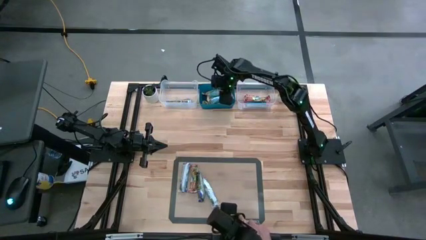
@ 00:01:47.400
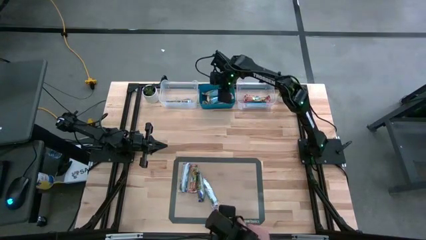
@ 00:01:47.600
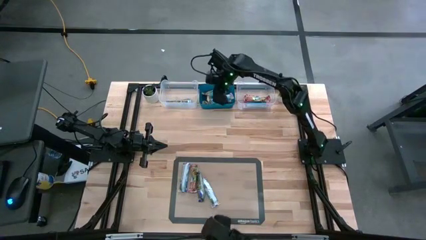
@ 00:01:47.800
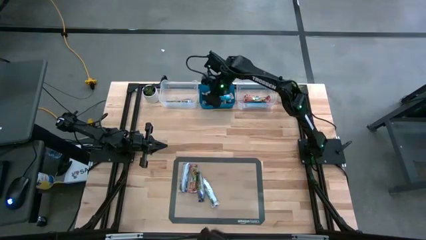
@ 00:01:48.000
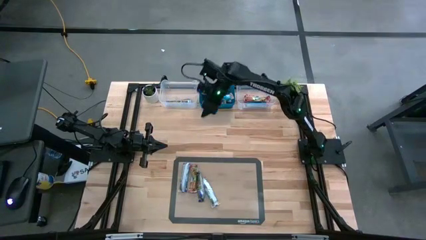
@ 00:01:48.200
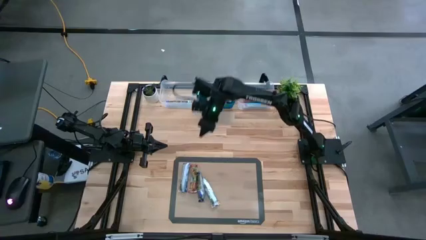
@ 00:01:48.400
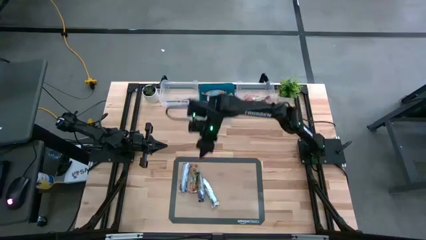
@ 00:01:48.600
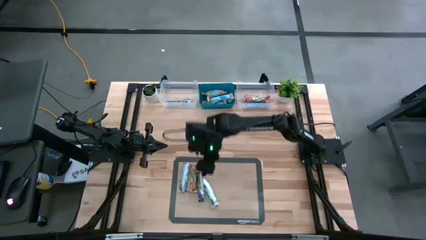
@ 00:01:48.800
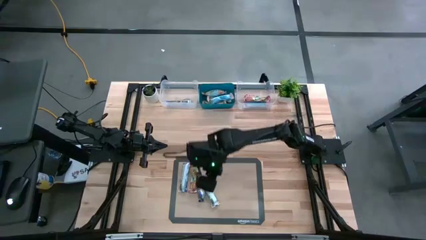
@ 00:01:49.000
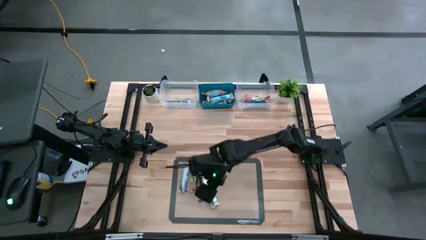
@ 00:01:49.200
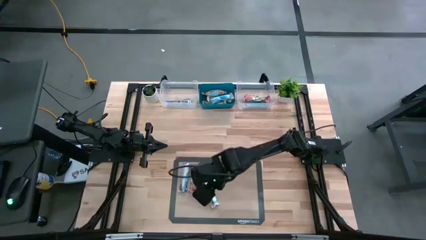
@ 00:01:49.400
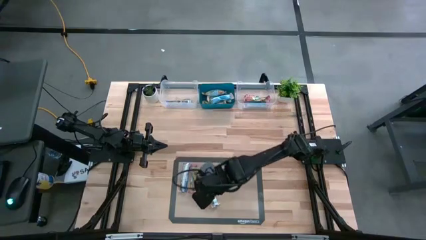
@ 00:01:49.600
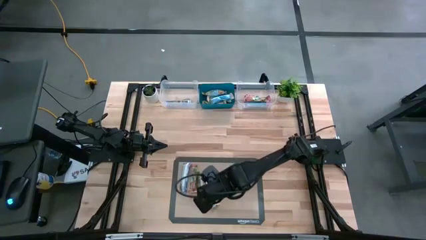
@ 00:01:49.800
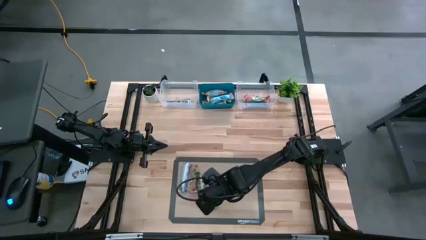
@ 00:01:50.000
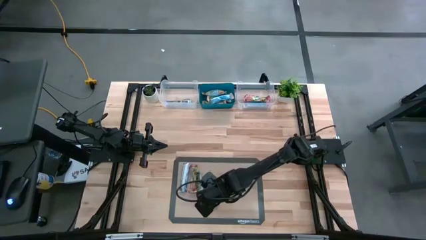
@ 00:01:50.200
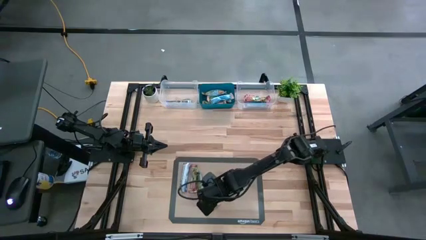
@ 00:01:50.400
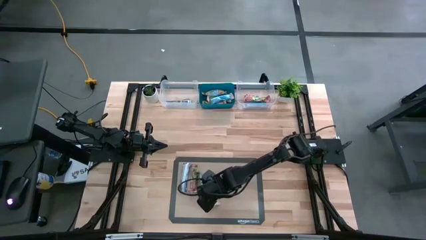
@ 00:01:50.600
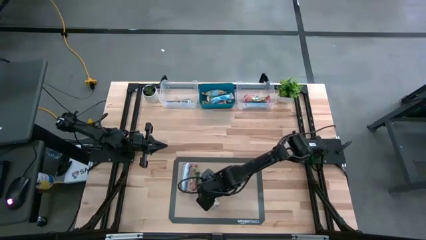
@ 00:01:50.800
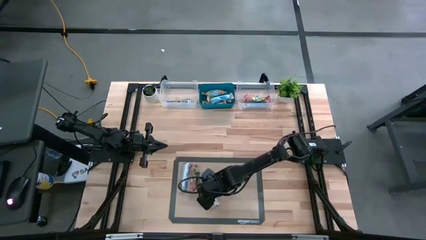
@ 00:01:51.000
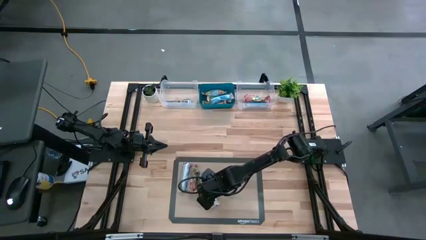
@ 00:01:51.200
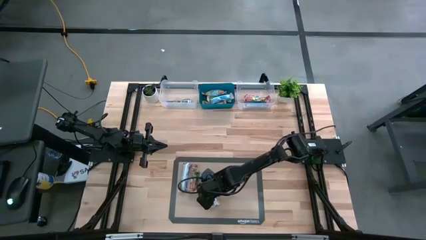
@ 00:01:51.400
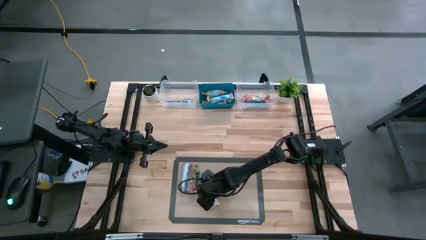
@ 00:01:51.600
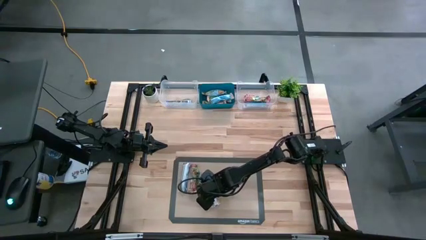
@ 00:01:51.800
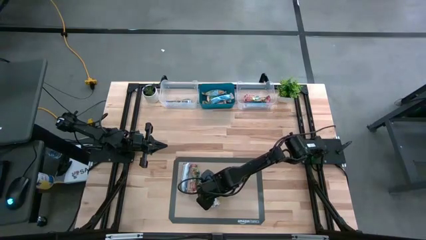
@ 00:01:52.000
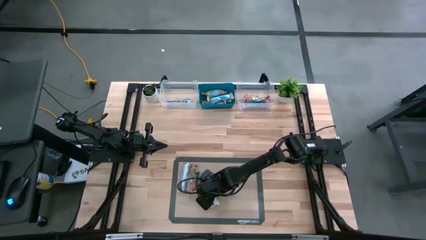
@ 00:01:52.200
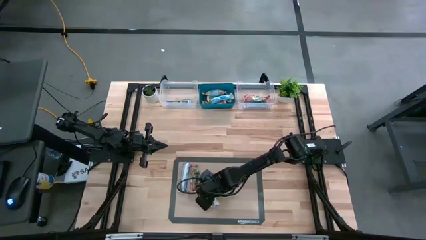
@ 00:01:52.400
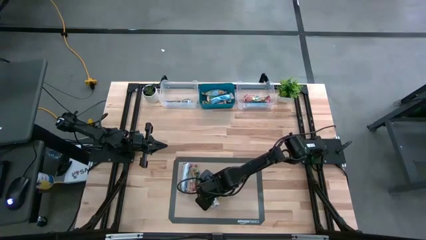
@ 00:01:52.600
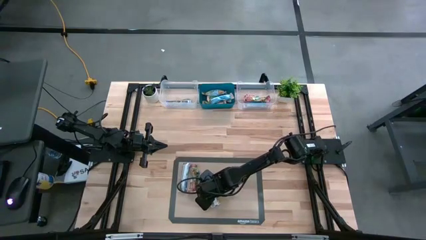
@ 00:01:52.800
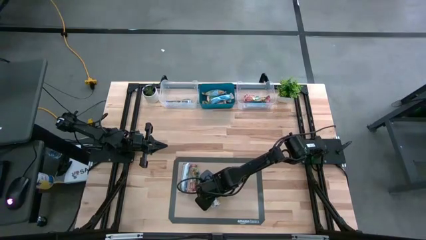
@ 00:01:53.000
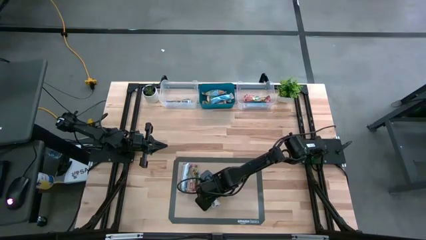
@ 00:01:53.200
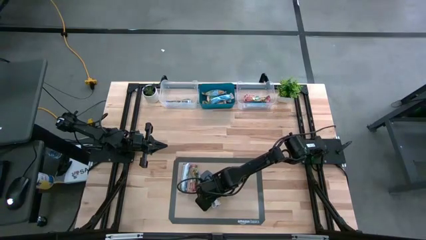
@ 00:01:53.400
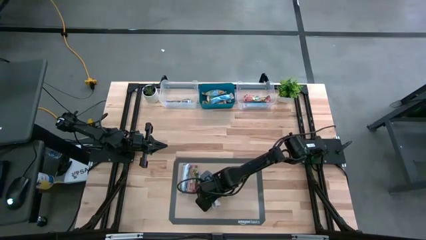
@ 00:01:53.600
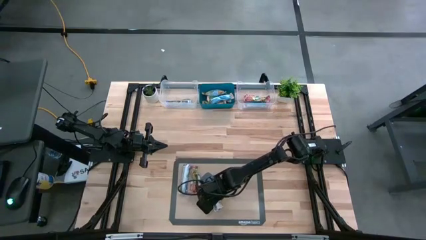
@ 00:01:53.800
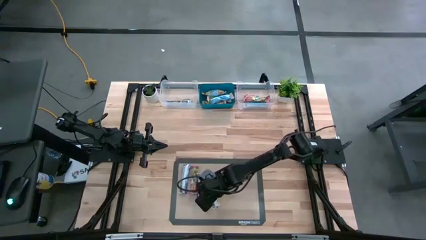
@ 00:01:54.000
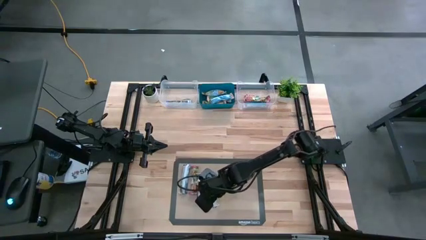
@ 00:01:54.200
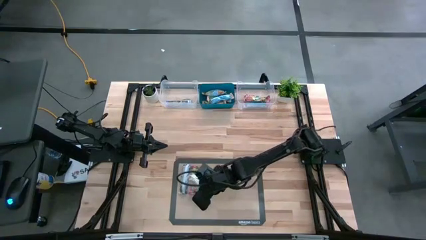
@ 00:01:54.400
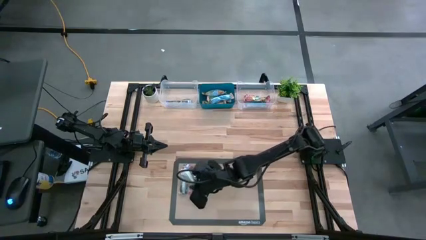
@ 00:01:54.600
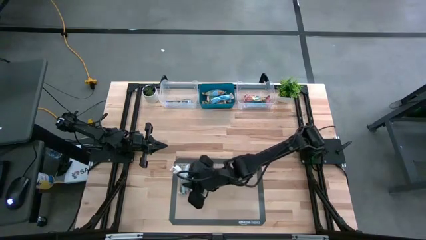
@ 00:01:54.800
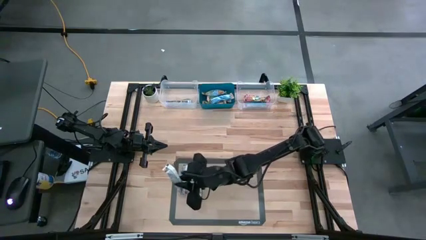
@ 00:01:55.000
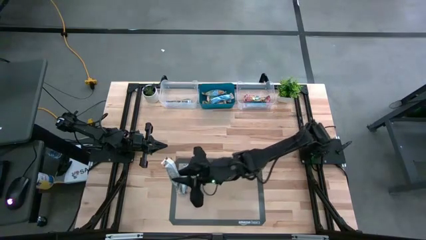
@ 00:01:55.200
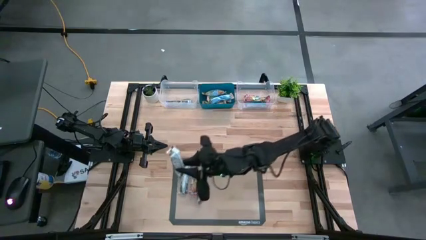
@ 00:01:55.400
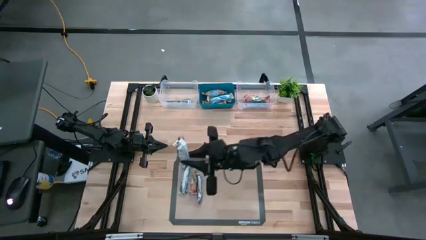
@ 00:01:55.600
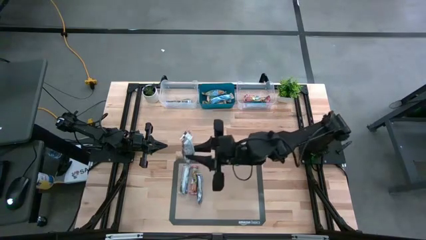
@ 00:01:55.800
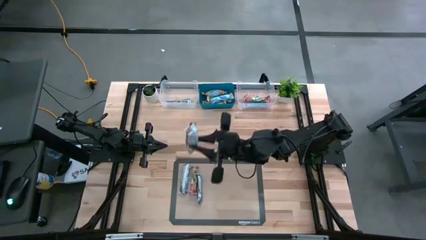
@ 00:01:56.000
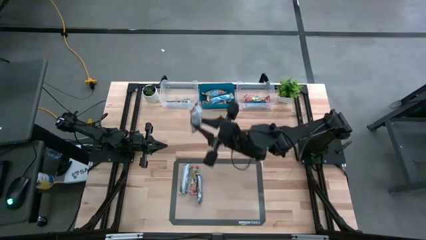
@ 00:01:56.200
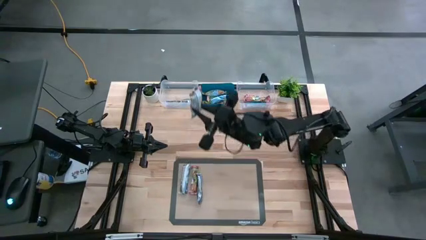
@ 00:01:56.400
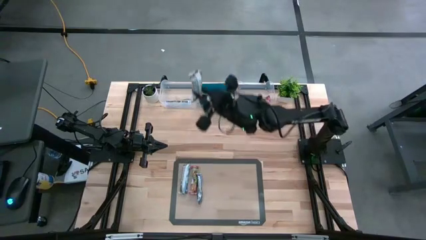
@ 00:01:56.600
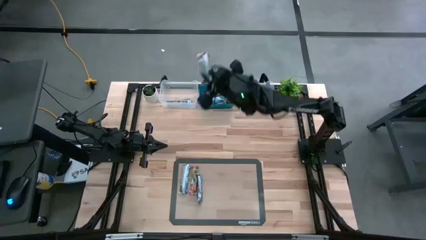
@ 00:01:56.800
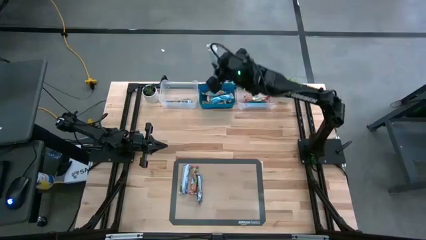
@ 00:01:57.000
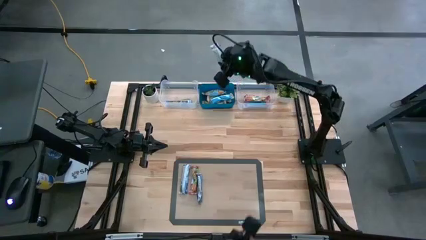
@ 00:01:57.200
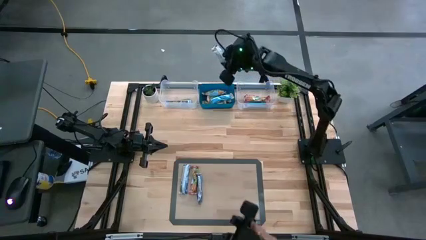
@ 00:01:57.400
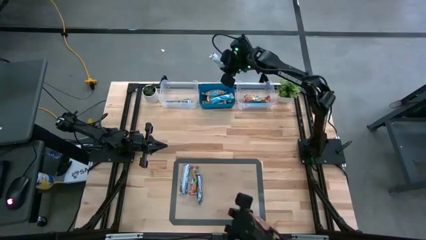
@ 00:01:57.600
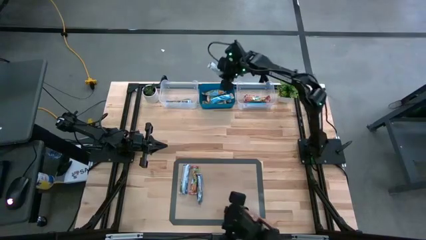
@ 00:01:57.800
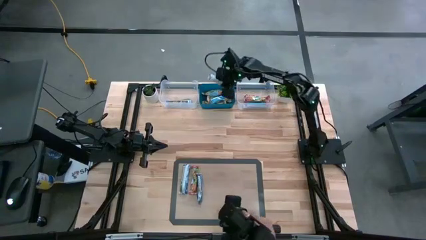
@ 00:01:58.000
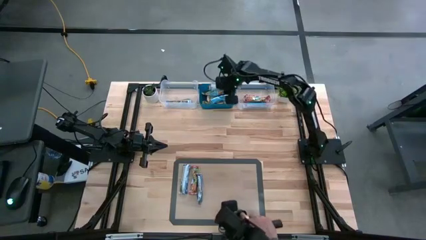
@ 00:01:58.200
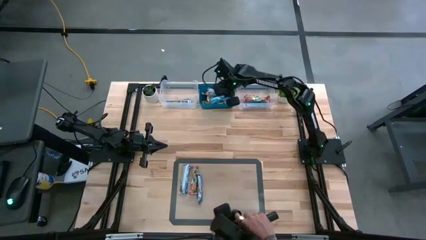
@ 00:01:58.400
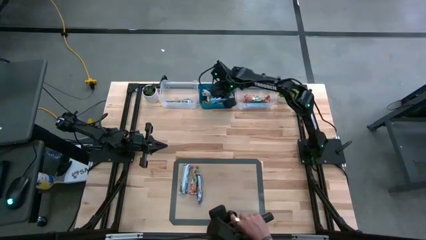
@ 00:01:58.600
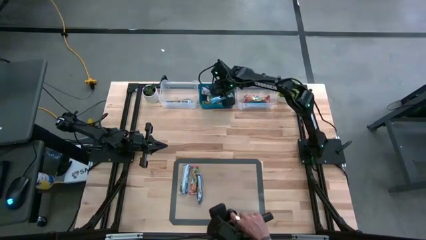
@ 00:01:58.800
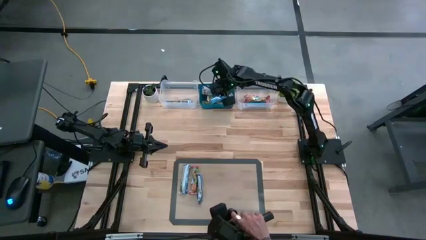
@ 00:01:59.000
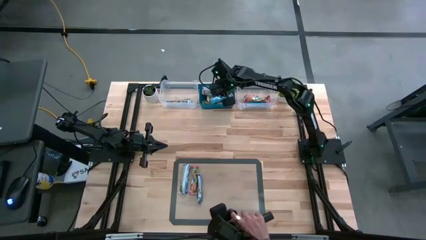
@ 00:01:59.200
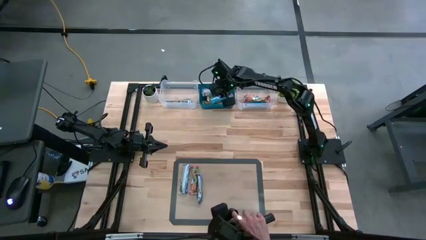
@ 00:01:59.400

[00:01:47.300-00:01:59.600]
Task: Pick and place Granola Bars by type
Put the yellow granola bar into the blue bin

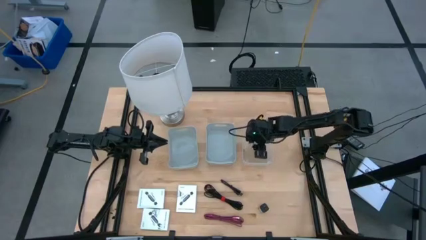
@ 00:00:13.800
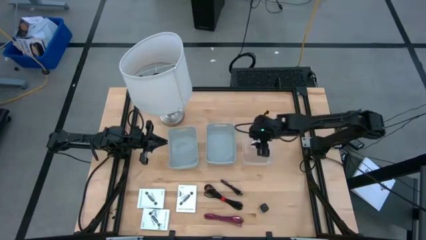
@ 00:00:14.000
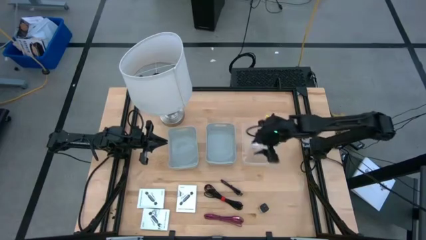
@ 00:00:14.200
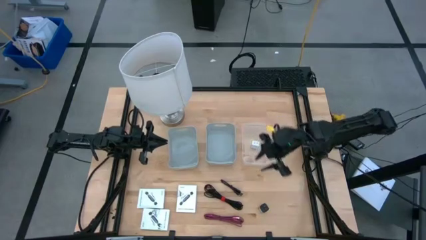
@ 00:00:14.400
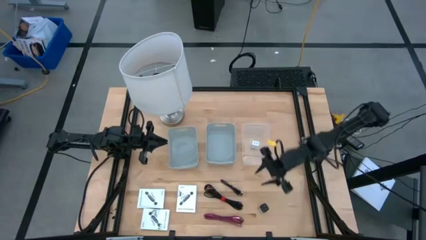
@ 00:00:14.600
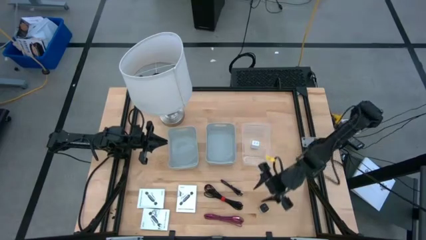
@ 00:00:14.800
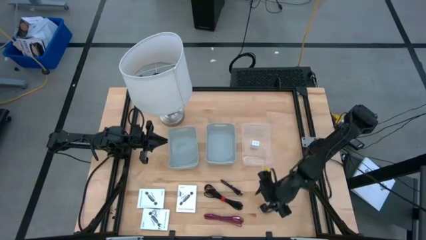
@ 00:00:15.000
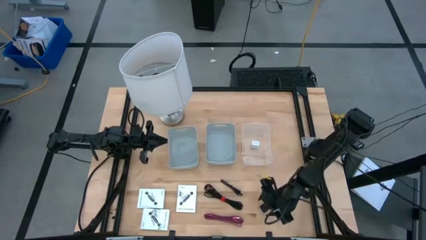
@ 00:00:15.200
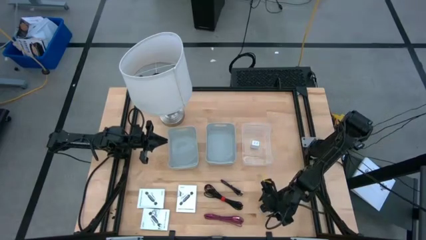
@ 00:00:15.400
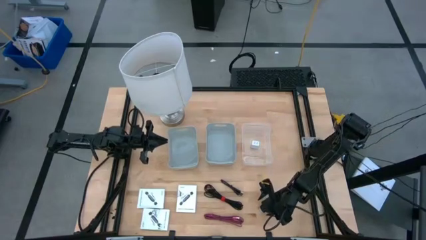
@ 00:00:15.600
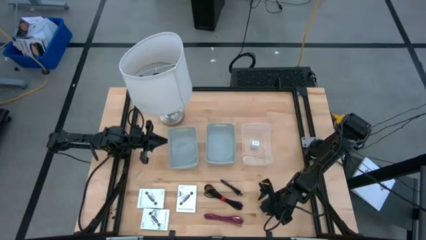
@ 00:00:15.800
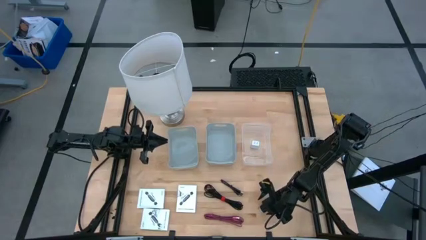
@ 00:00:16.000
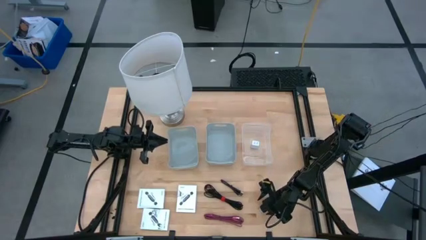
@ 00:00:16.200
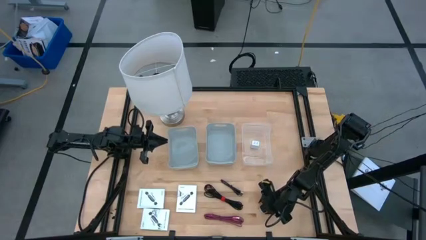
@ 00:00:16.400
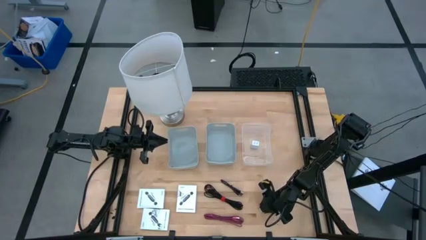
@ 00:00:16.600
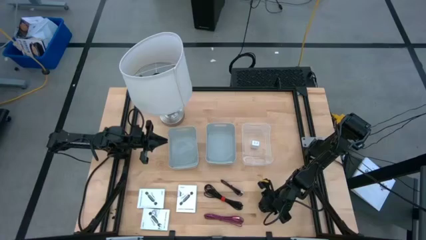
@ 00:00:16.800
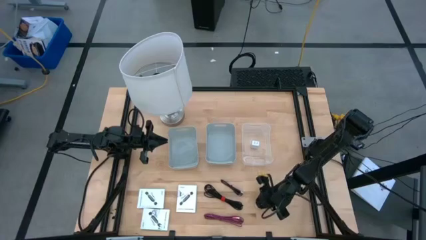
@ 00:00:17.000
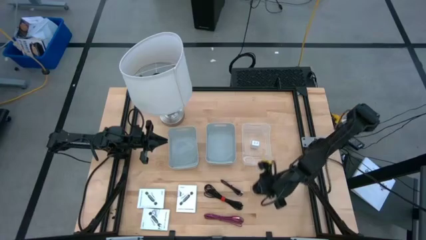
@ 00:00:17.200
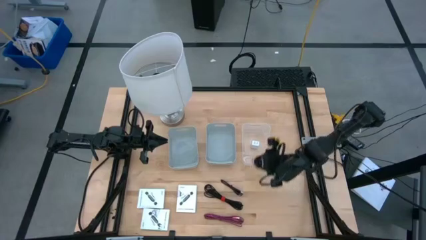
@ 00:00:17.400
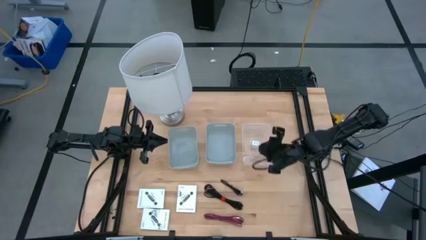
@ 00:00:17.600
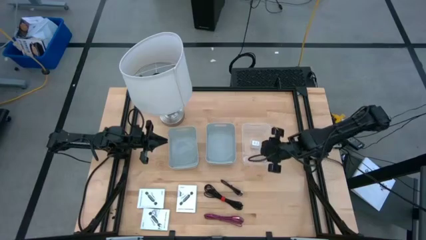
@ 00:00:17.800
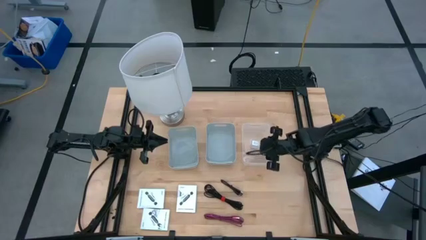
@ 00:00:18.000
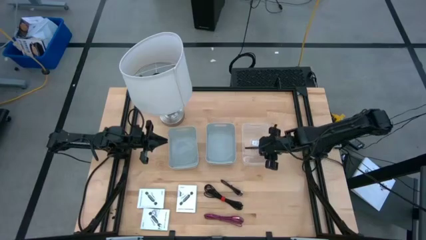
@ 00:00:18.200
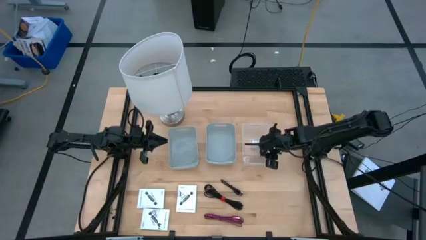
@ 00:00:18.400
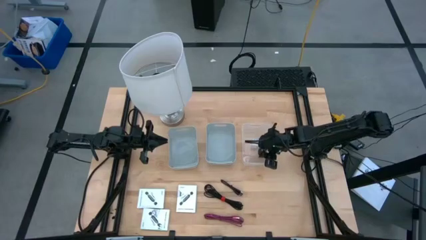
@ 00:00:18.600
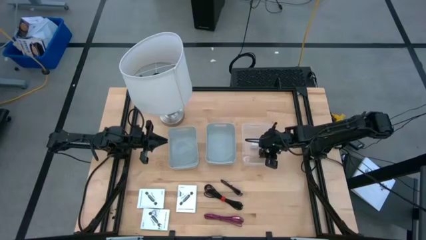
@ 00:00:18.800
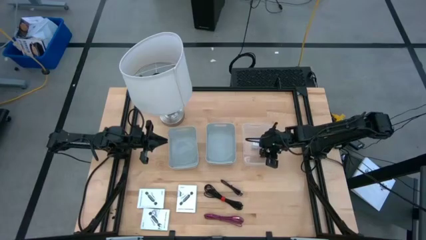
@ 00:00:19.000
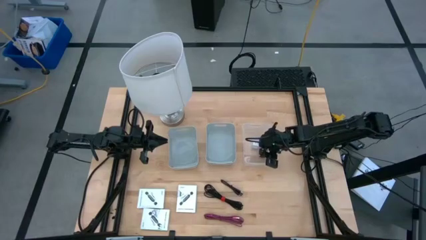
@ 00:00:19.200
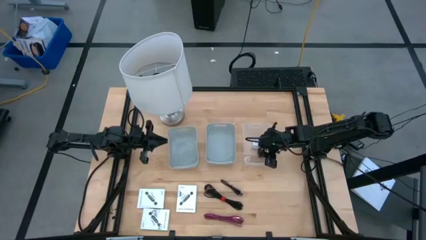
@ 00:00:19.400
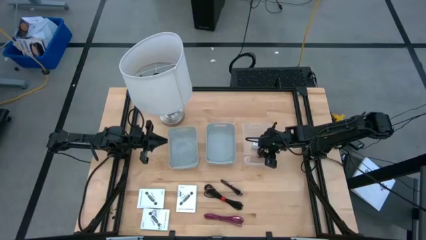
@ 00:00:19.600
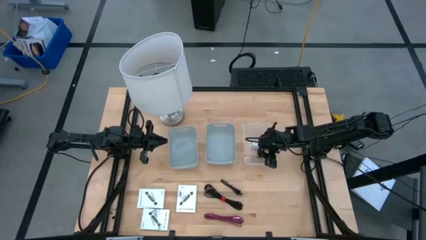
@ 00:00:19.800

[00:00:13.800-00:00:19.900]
Task: Pick and place items into bin
Put the black charger adapter into the transparent bin
